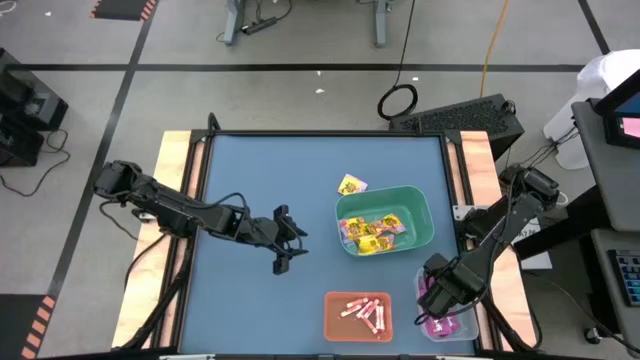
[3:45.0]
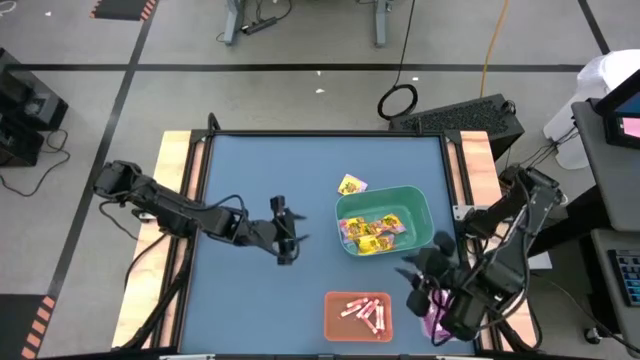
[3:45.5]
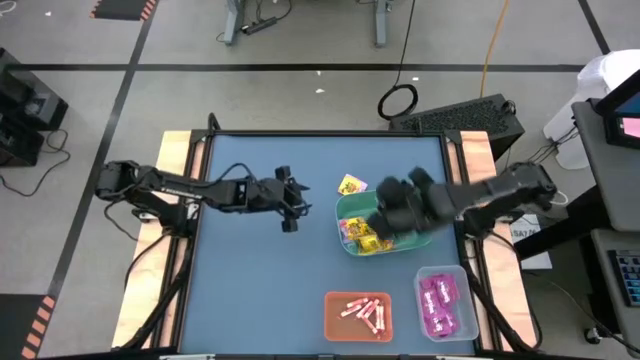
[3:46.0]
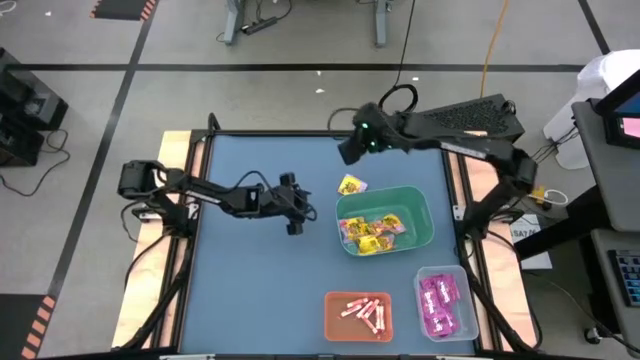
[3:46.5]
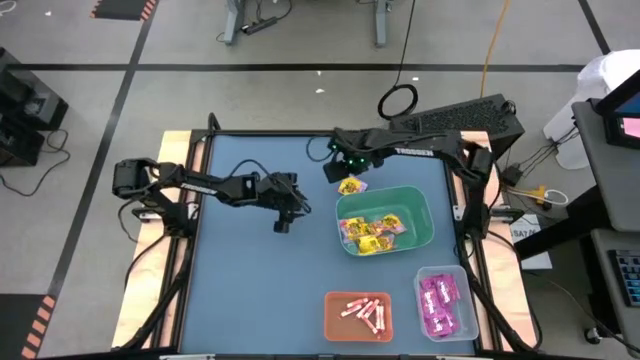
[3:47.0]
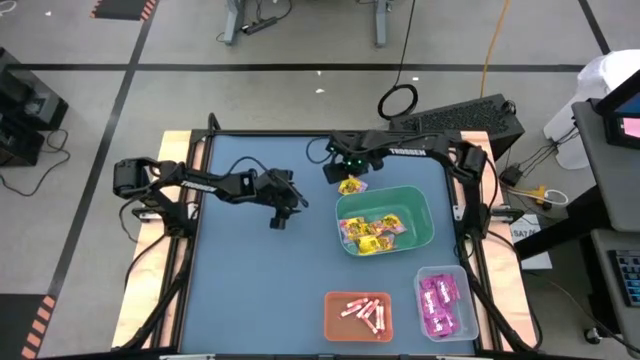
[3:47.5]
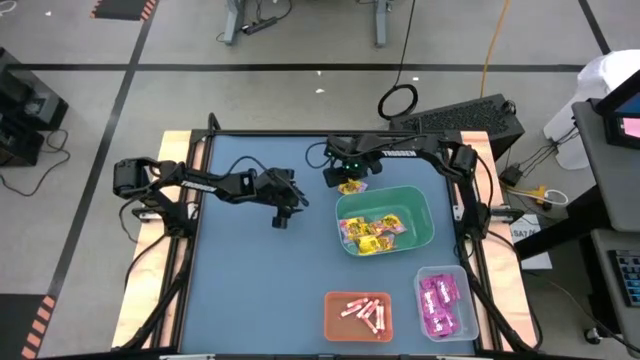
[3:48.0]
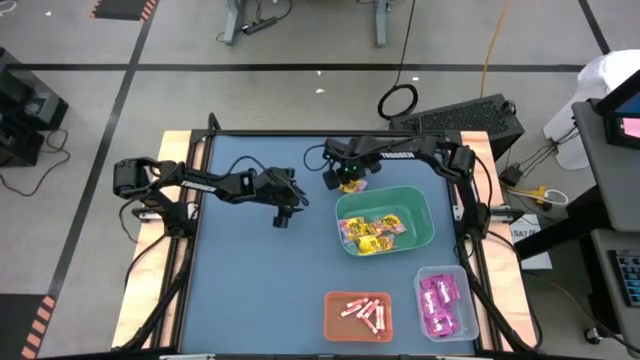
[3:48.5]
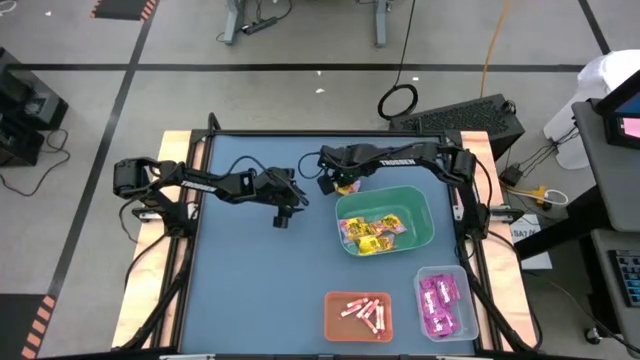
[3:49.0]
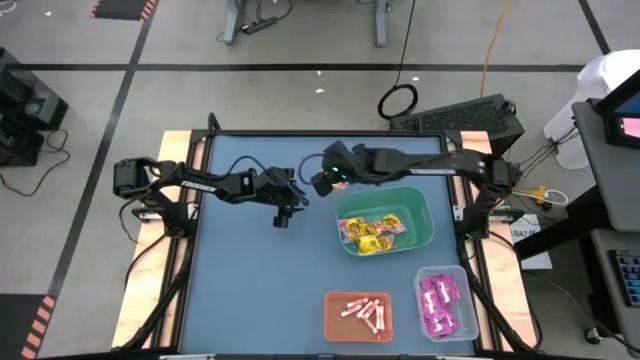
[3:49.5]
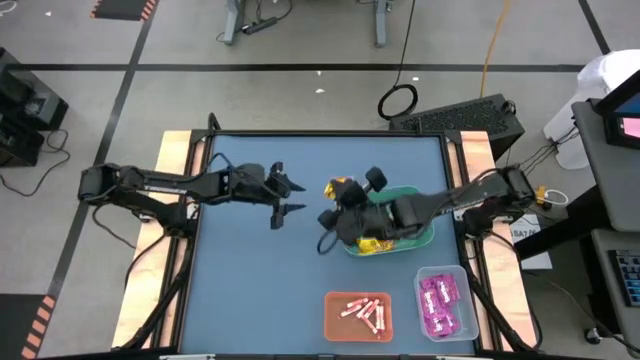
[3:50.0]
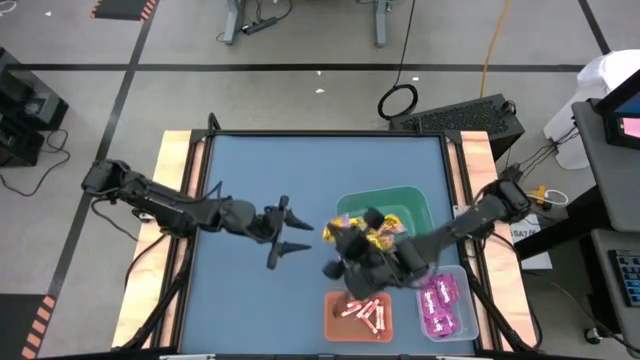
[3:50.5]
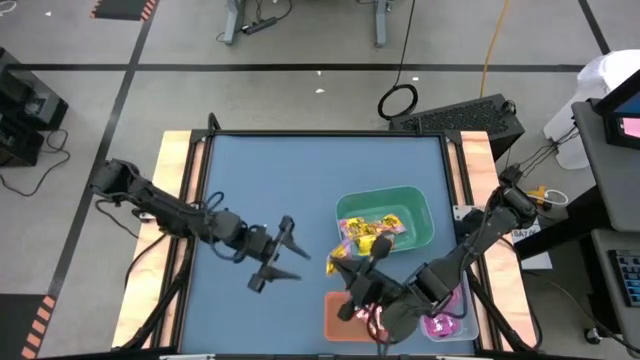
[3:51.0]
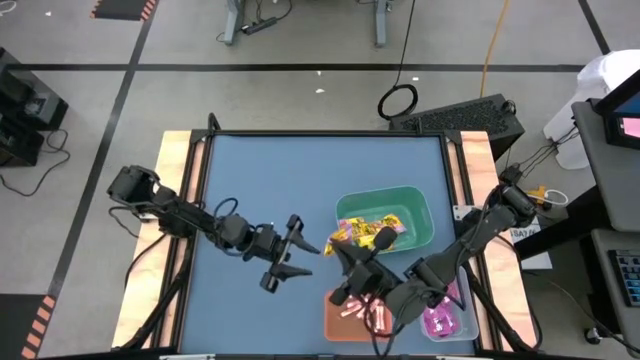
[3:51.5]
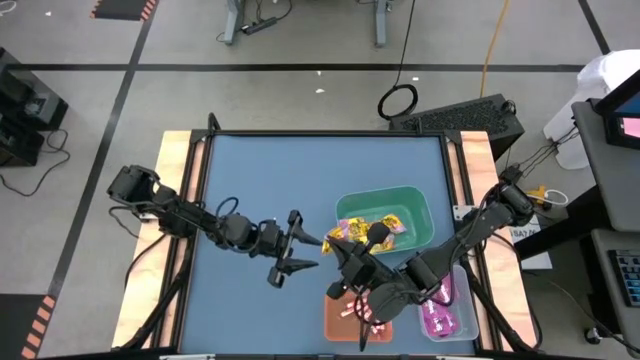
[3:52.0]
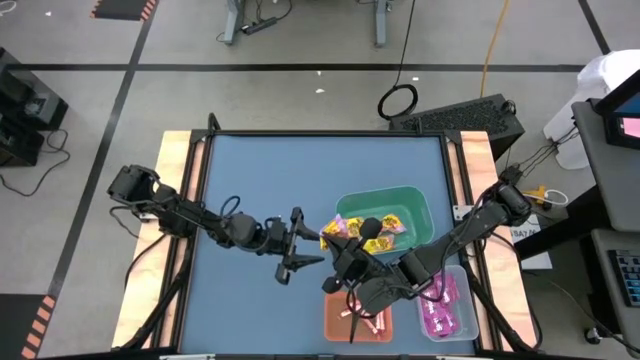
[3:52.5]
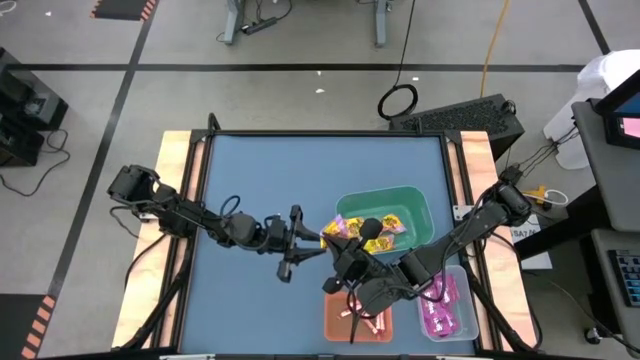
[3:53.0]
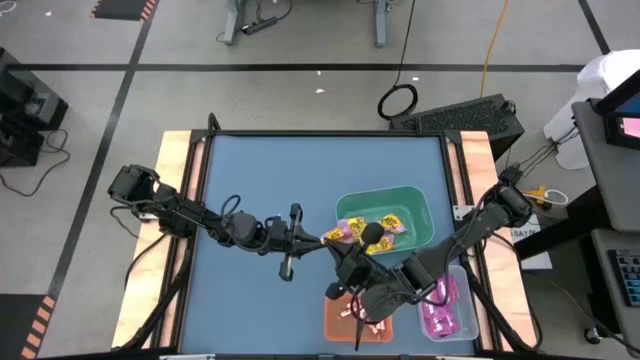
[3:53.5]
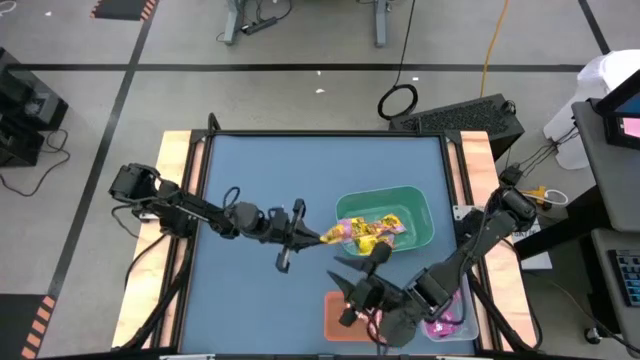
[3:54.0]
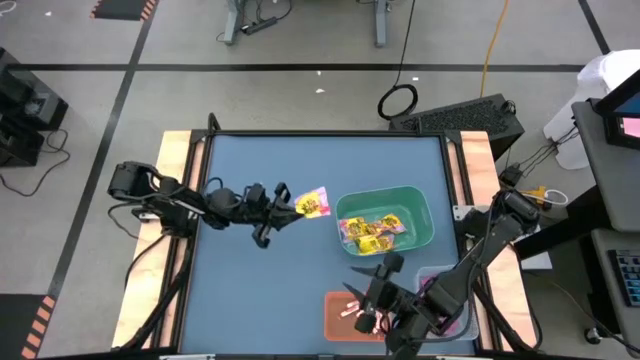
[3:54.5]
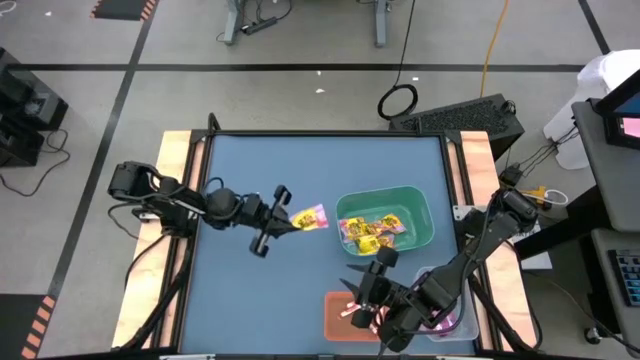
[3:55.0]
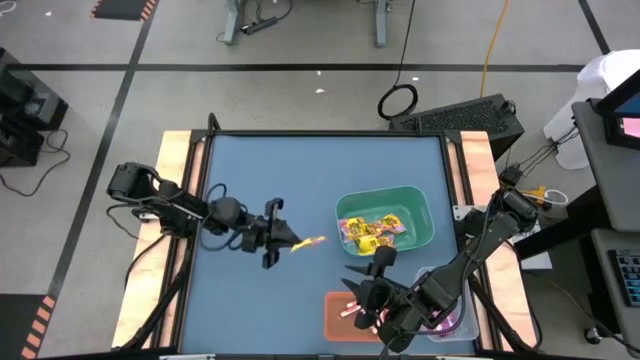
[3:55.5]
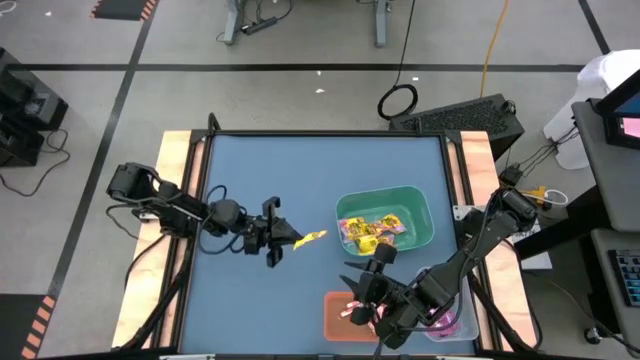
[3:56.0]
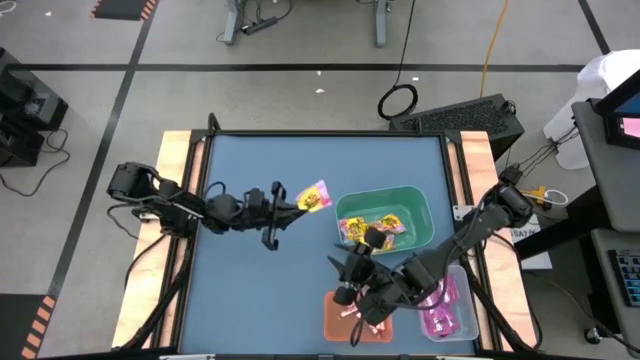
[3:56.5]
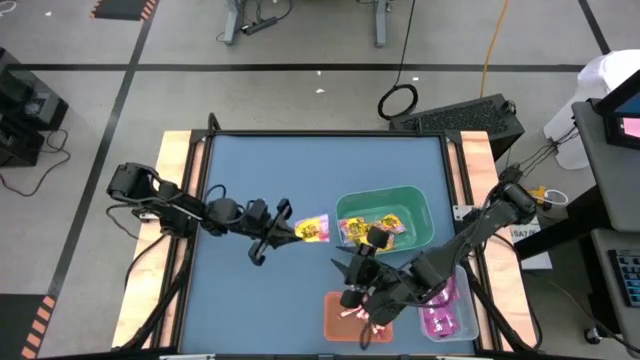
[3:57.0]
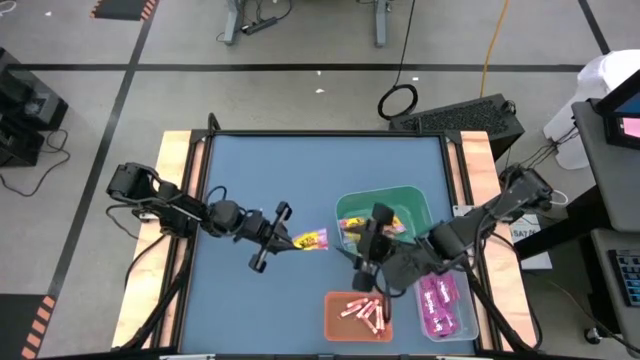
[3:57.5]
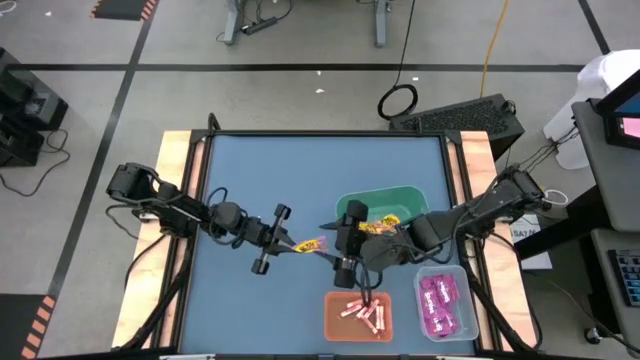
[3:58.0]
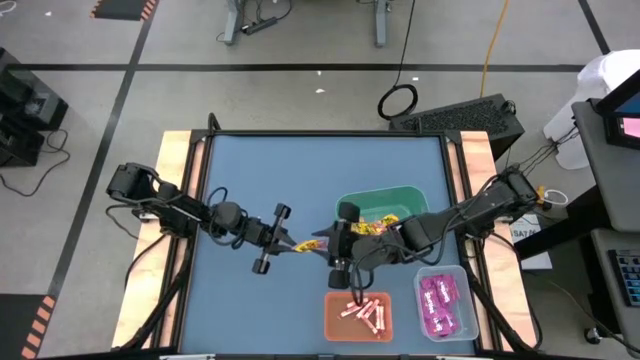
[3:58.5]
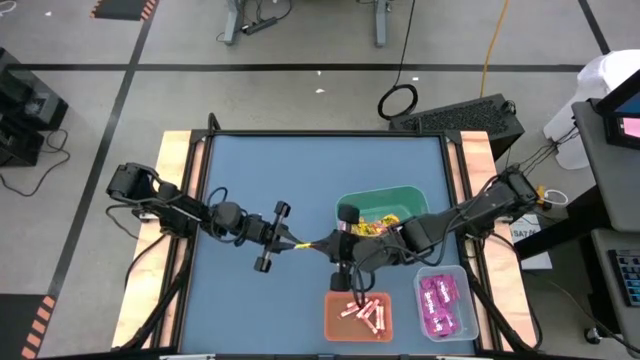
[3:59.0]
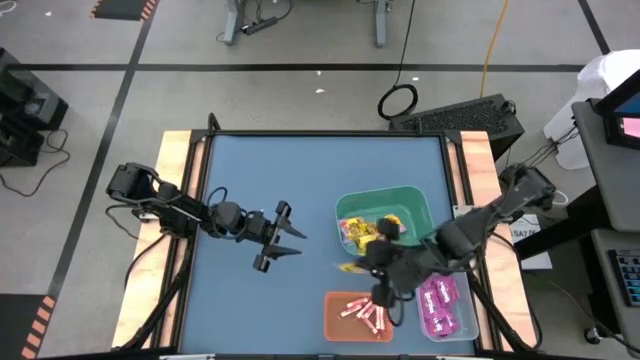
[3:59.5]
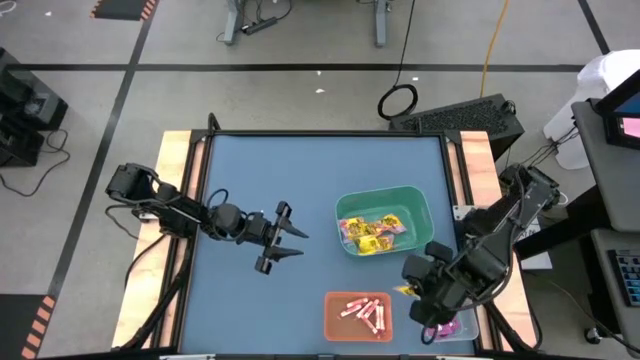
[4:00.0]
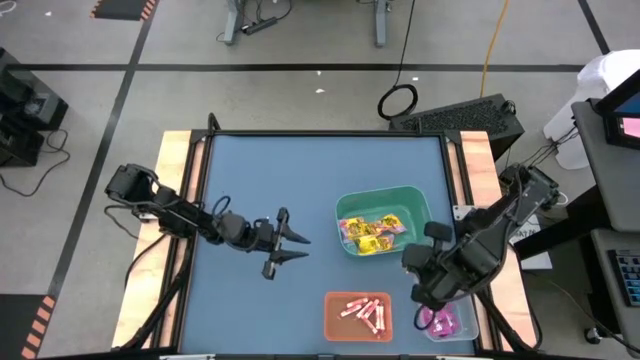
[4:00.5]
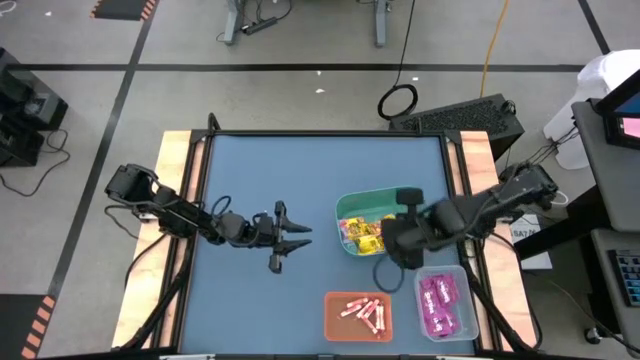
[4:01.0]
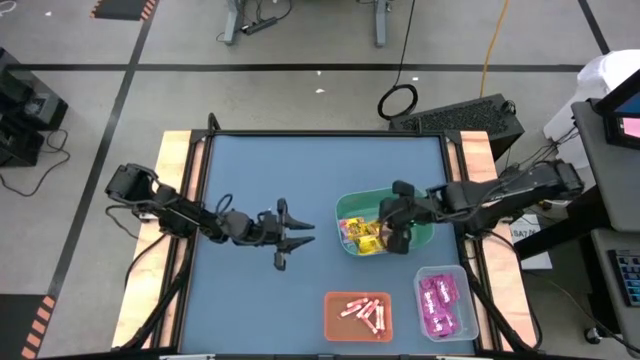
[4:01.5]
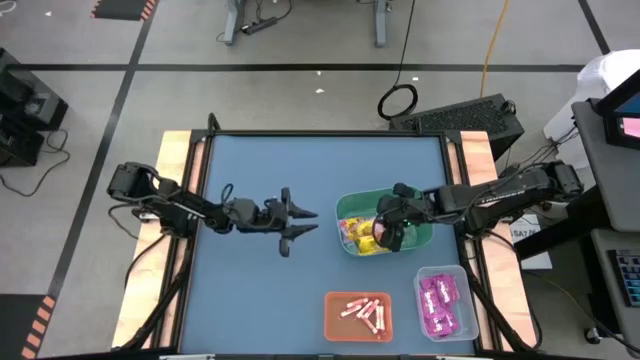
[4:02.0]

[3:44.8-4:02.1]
Task: Sort candy
Put the yellow candy pack into the green bin

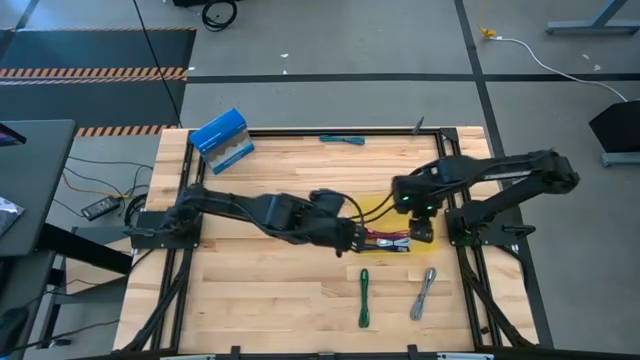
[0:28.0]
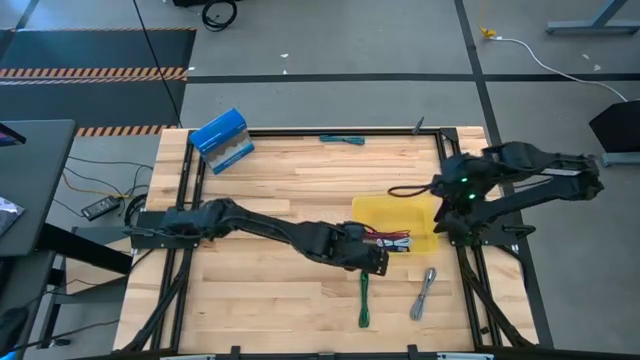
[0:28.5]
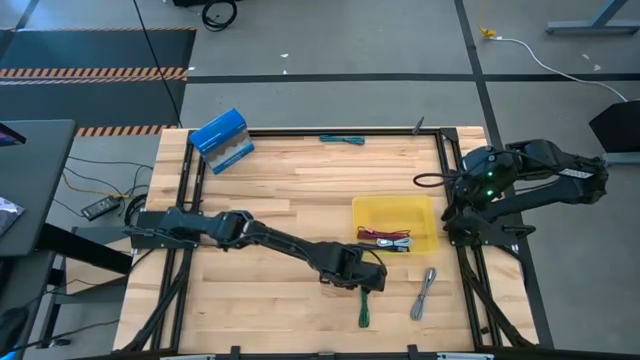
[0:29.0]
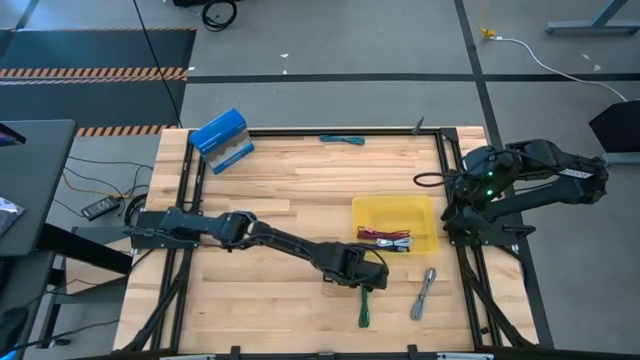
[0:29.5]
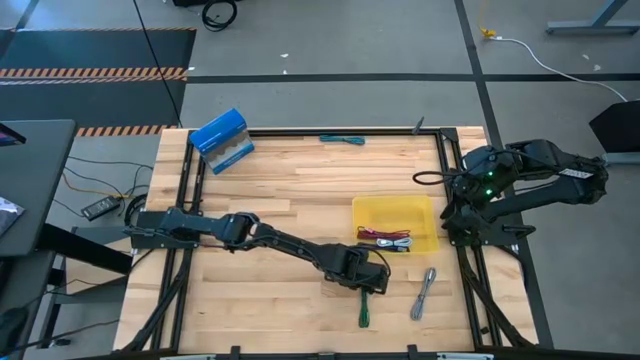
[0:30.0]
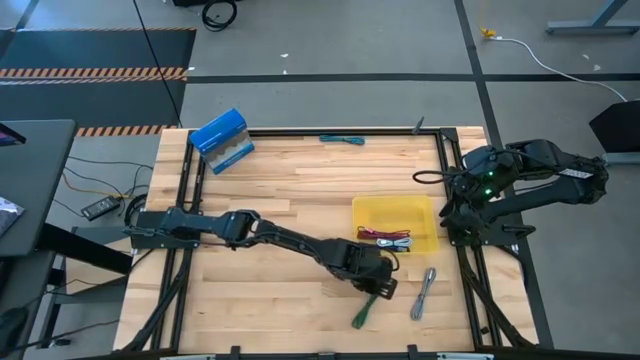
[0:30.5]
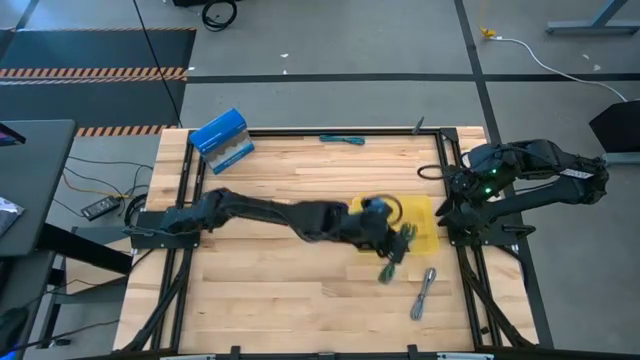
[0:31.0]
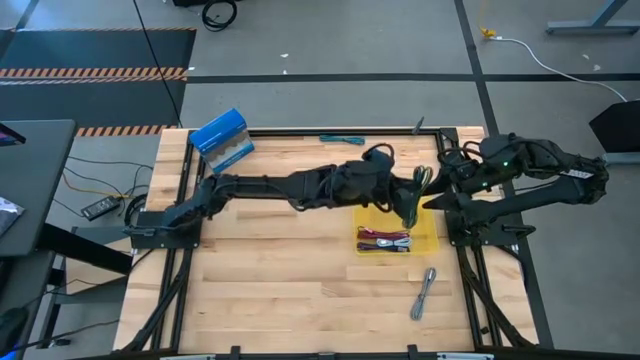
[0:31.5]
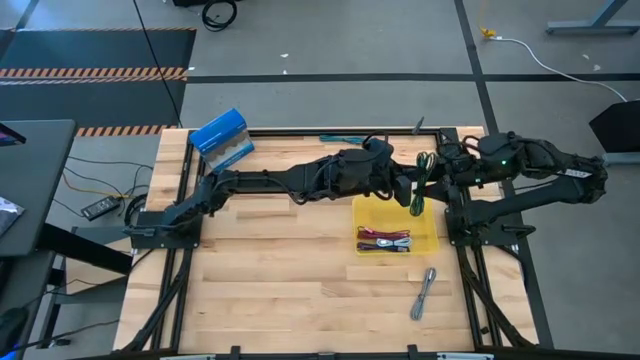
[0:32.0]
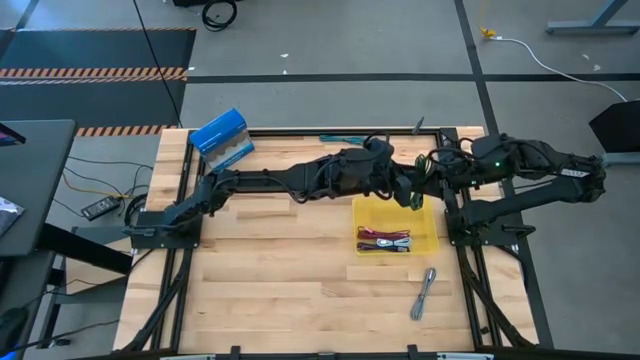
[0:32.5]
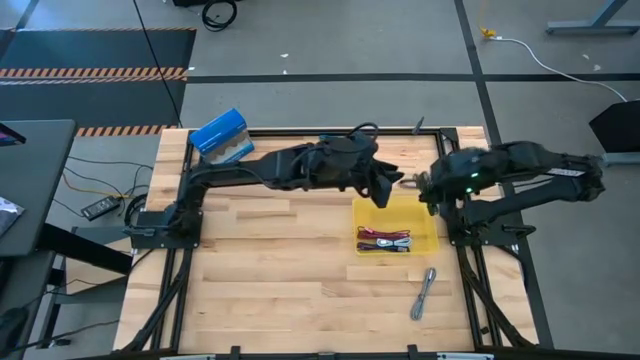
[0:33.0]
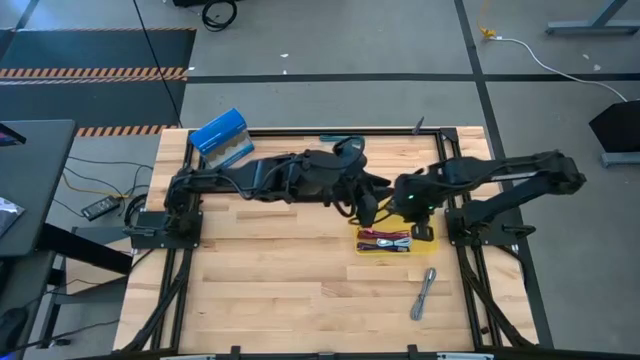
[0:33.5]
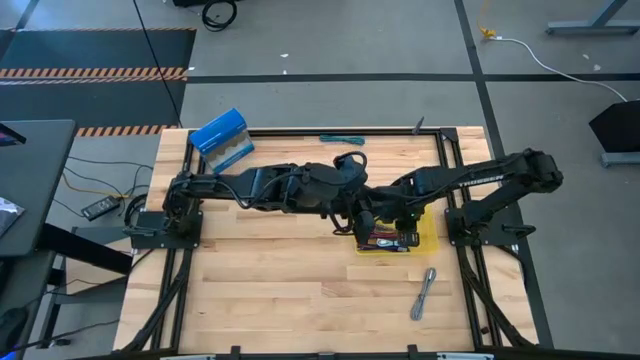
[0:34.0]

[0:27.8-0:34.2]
Task: Pick and place USB-C Cables
Put the green charger cable into the yellow bin
